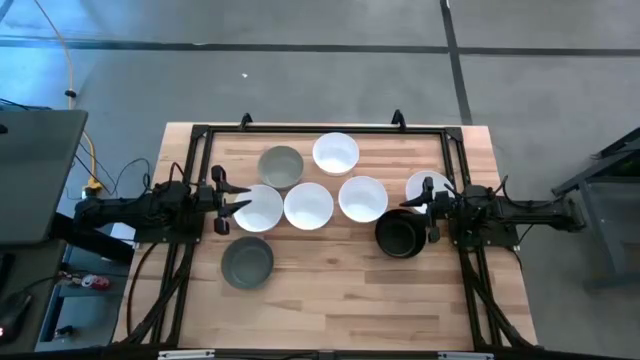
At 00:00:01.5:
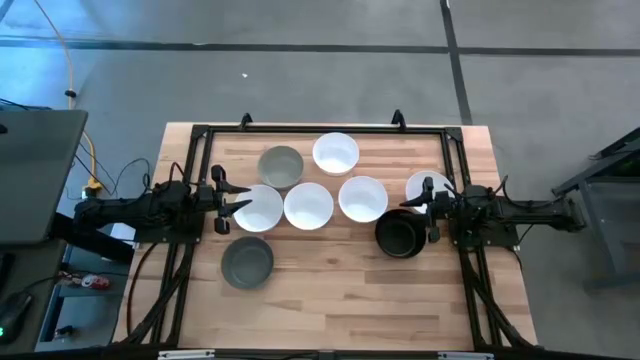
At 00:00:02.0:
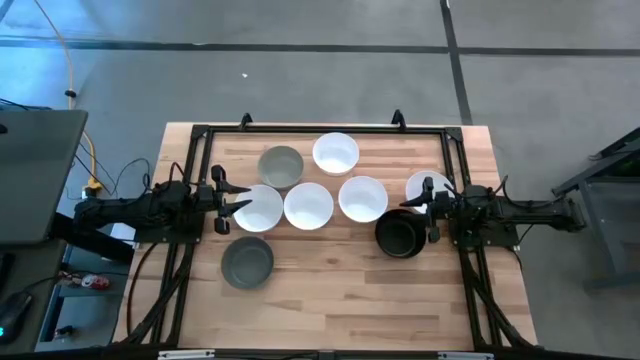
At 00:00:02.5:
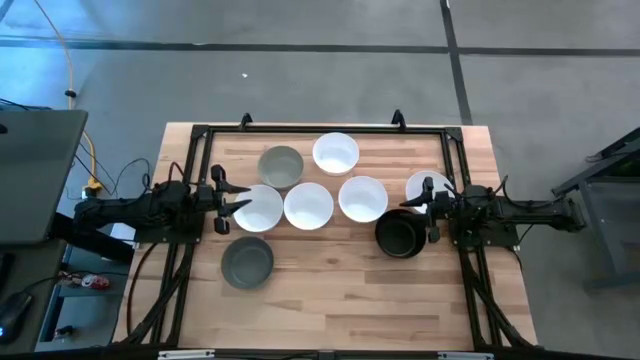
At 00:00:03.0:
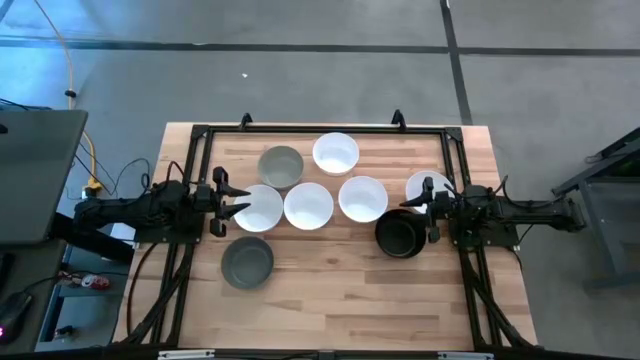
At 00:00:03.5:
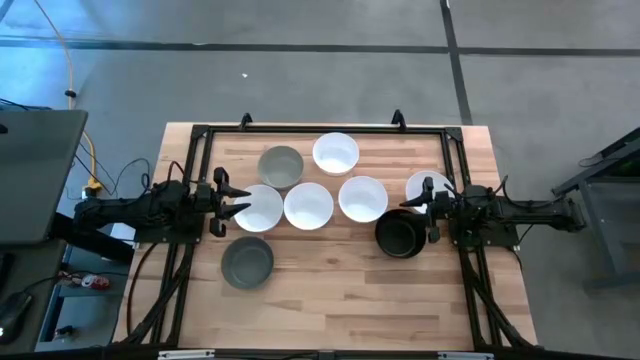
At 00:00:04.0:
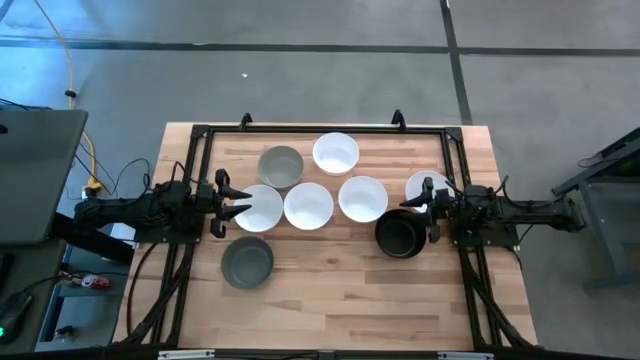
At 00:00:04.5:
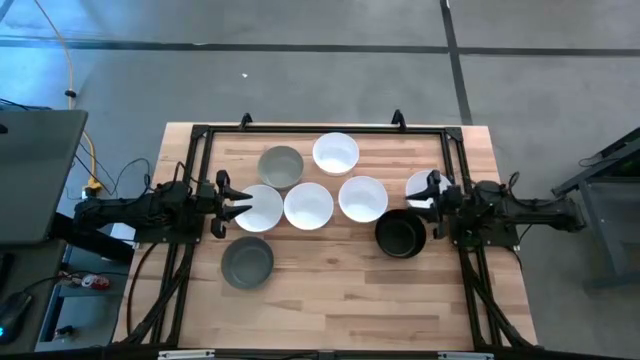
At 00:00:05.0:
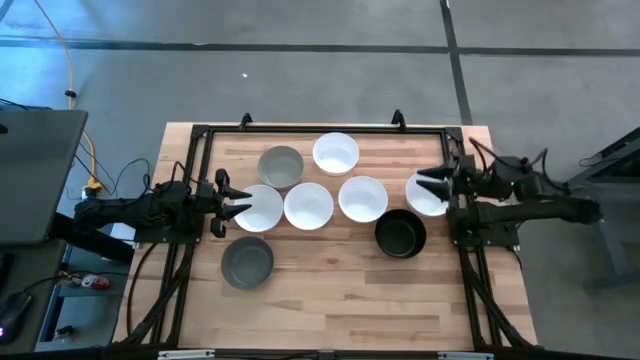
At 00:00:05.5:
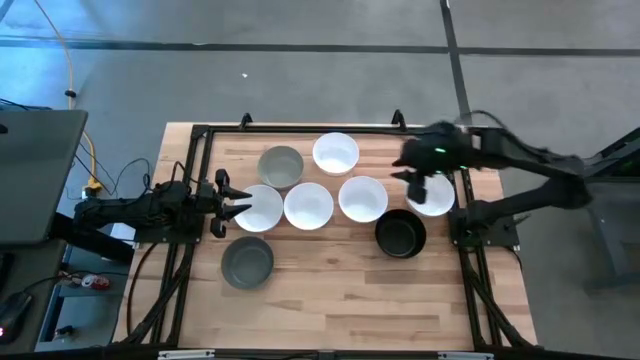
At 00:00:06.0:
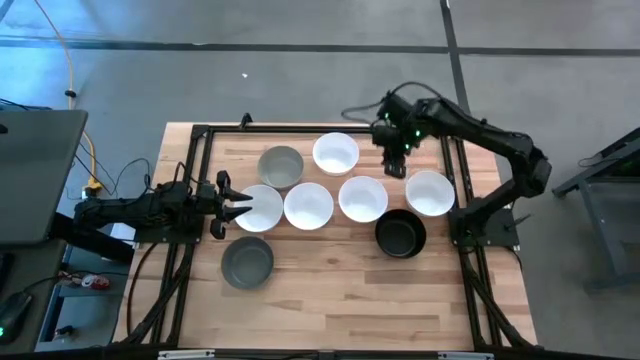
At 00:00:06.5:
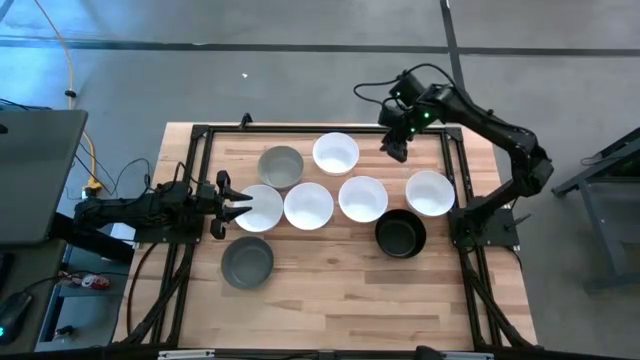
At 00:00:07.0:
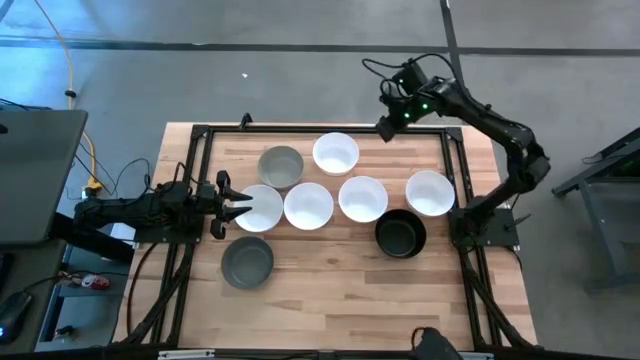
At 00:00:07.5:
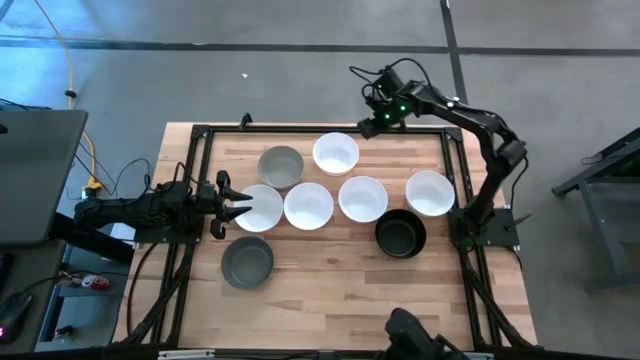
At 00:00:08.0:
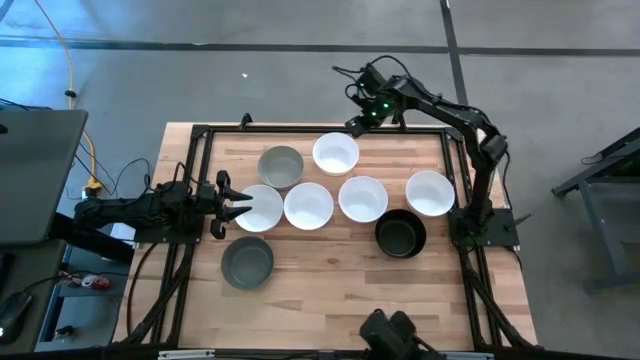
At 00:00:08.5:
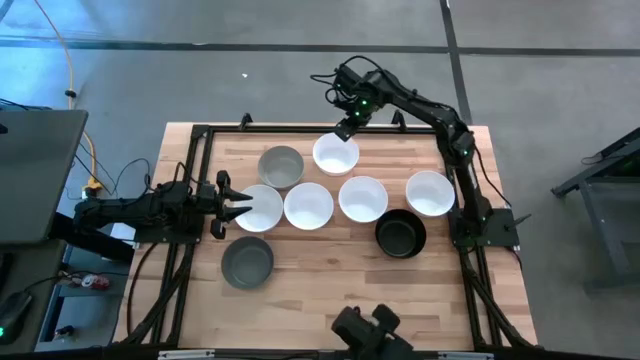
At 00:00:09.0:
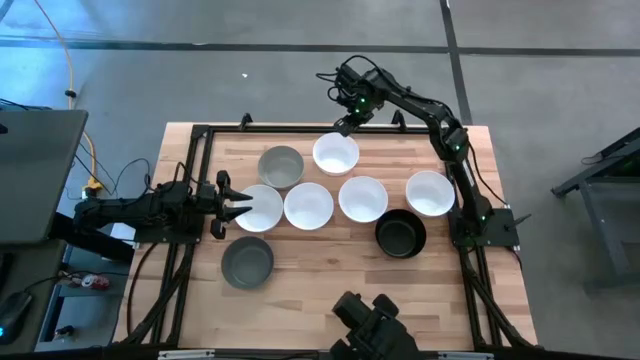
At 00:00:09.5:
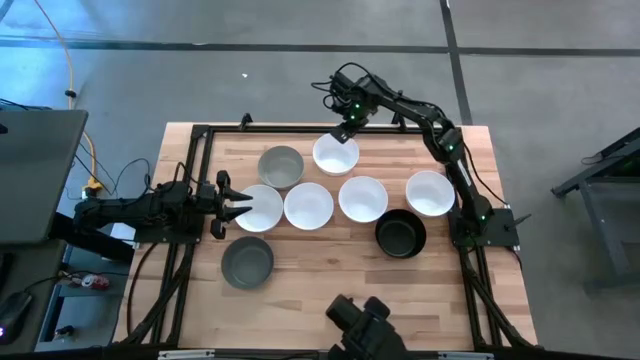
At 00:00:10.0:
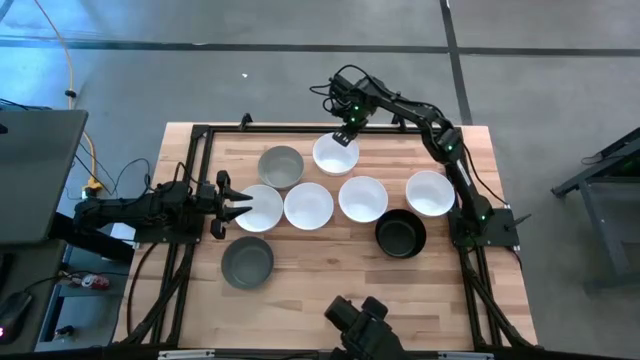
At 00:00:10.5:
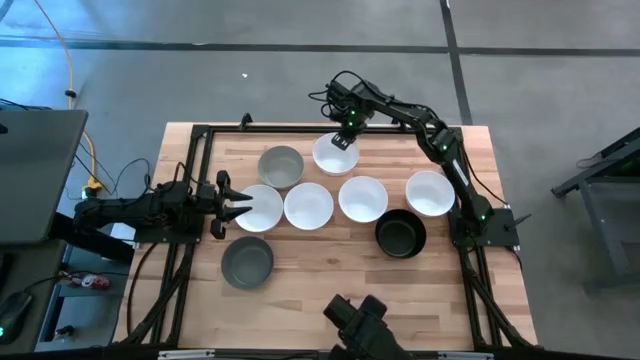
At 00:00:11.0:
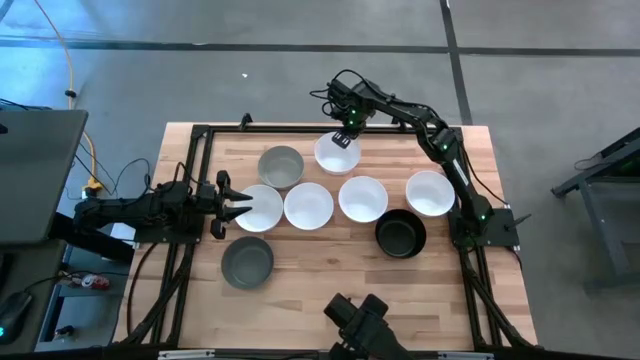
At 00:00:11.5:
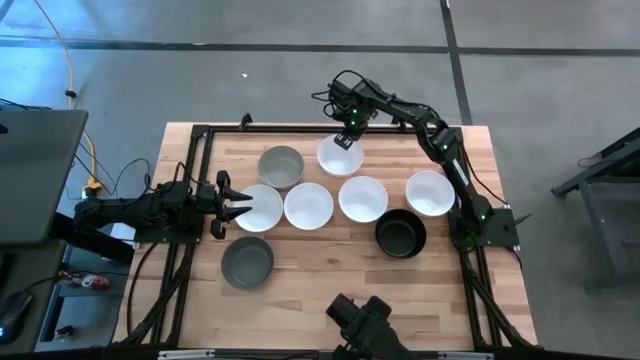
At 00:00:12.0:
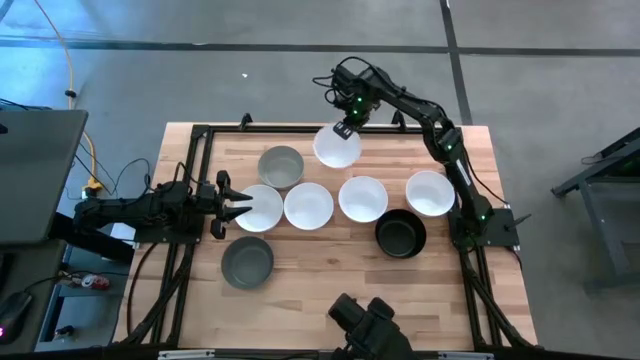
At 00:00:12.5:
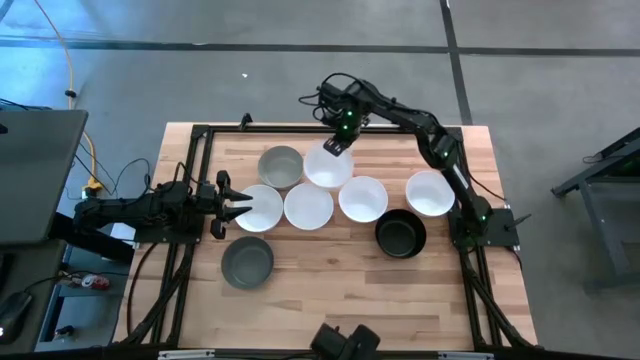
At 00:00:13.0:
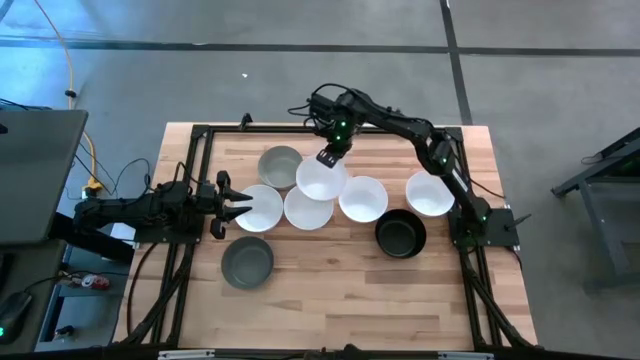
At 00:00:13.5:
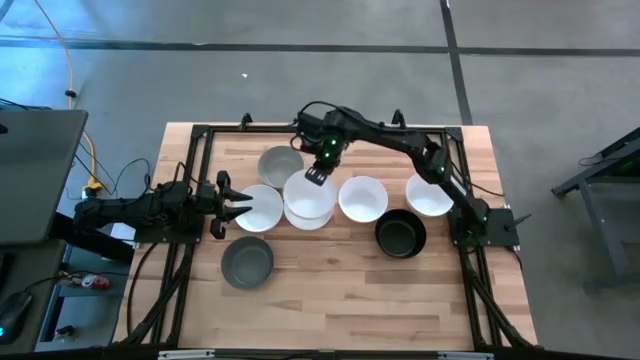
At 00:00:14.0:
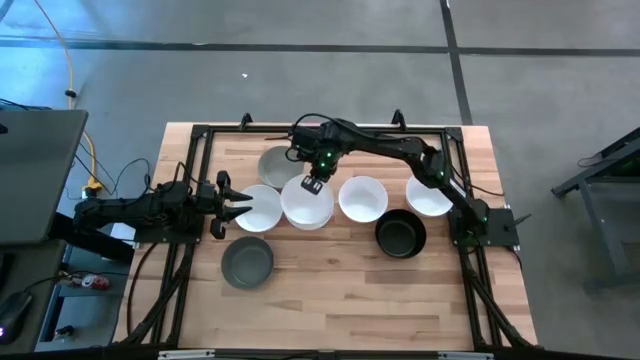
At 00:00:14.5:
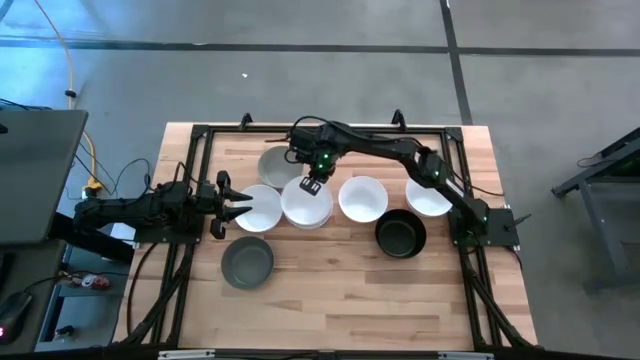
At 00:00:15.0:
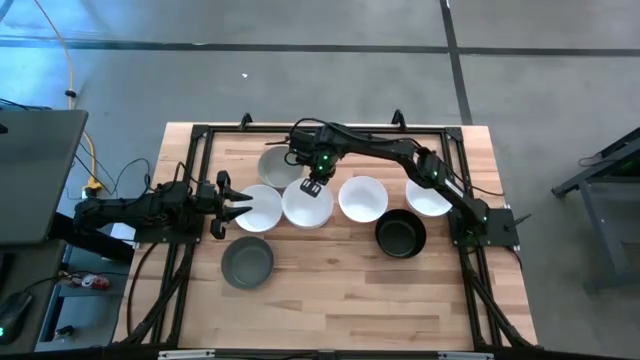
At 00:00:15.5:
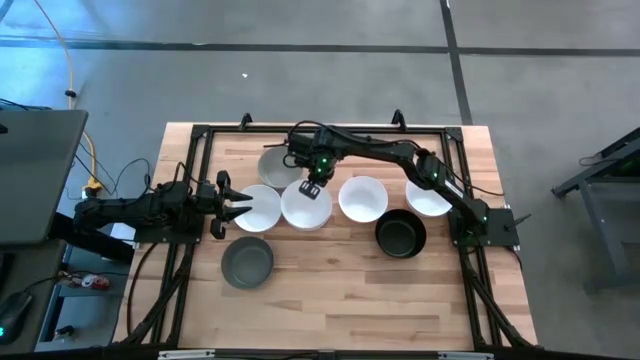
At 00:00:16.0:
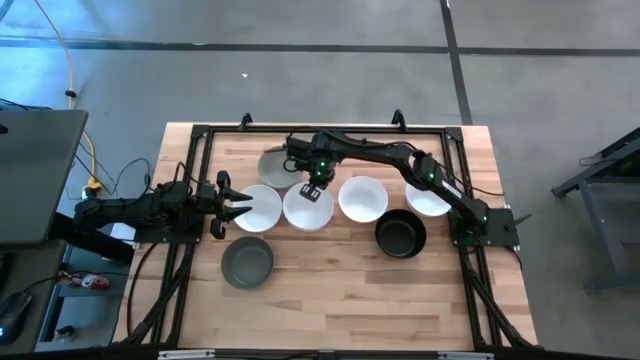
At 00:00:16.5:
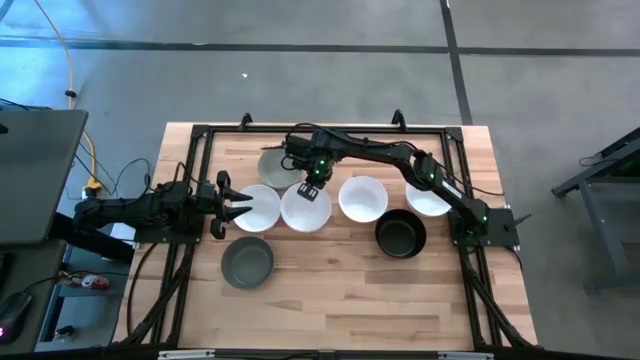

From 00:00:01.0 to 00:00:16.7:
Task: Nest bowls inside each other
Stack the white bowl on top of the white bowl

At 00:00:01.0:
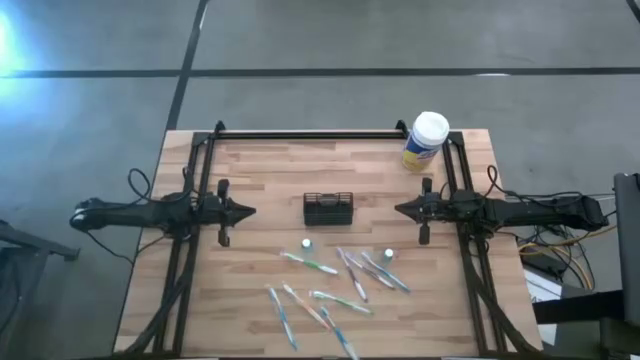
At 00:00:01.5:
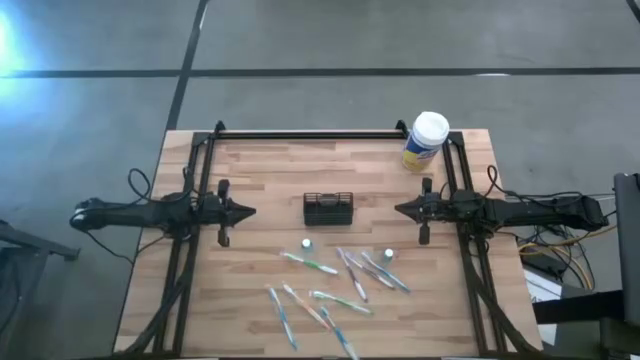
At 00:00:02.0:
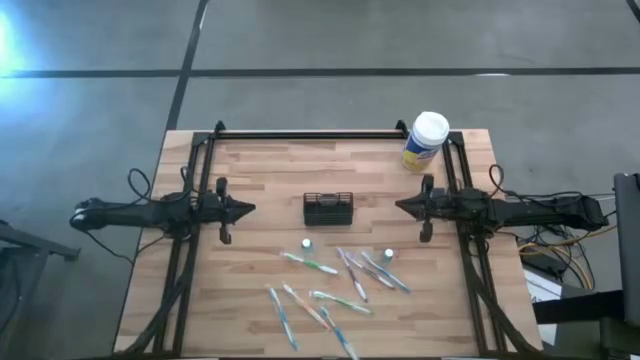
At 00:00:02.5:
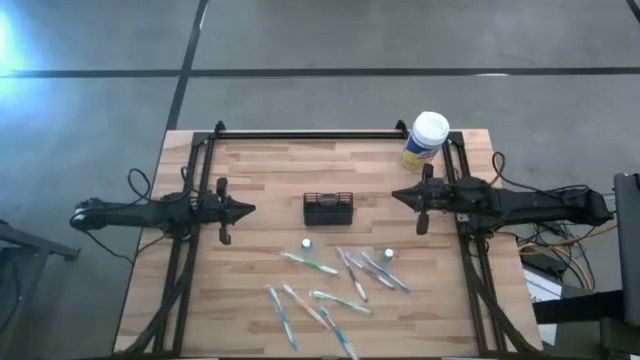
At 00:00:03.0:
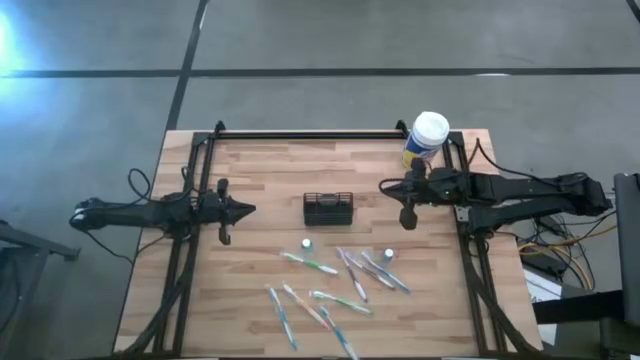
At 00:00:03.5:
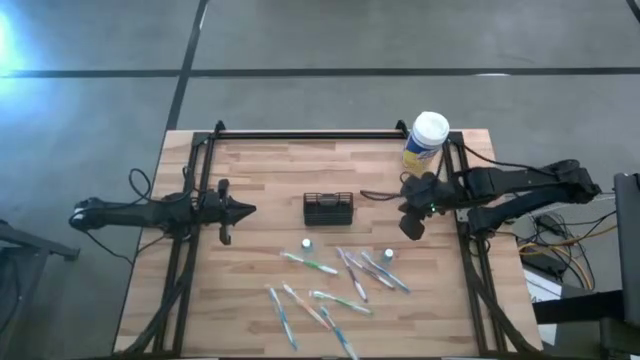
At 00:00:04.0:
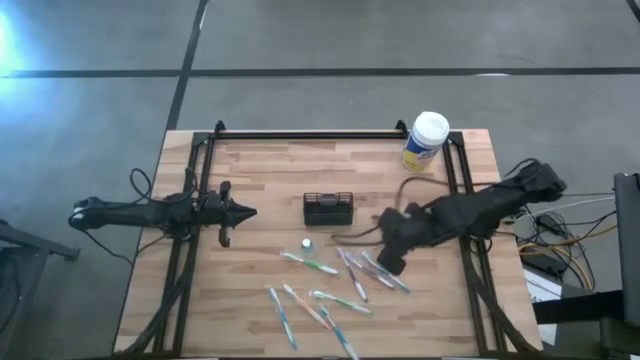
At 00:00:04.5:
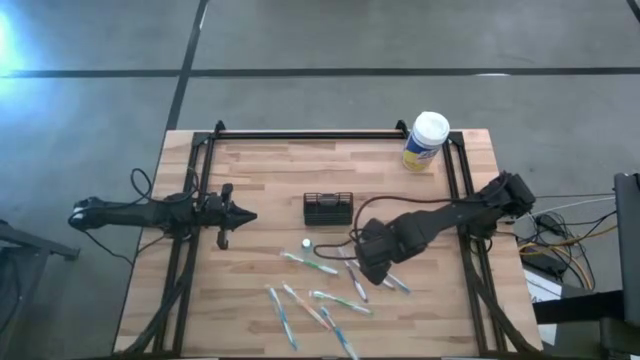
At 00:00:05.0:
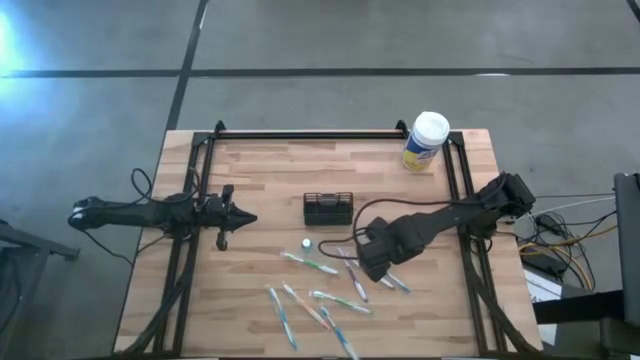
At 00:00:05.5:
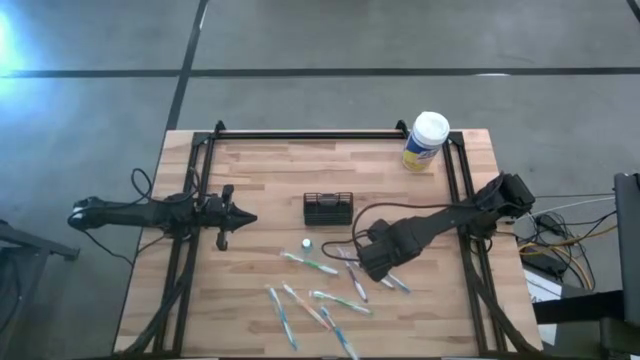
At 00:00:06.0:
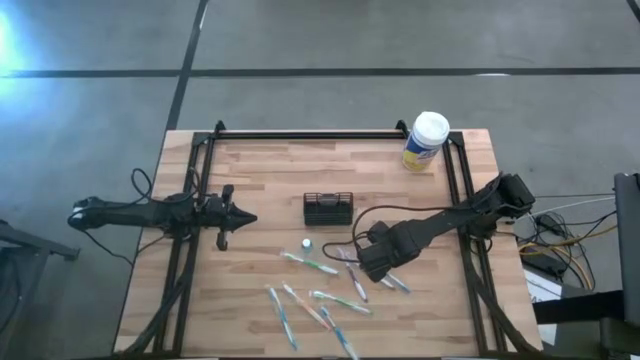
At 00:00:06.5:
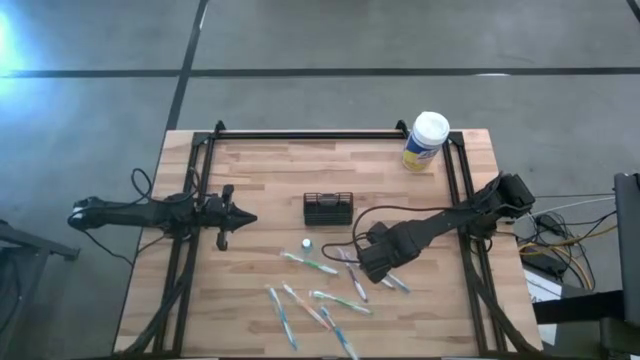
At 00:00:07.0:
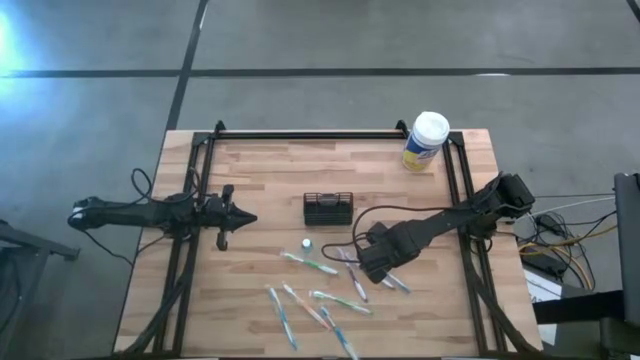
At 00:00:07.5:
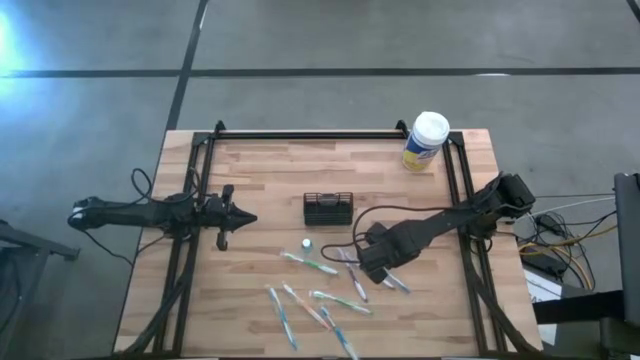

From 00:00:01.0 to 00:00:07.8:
Task: Pick & Place toothbrushing station
Put the right blue mouthwash bottle into the black organizer
